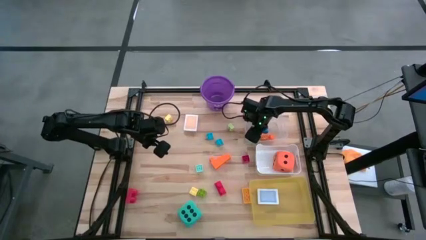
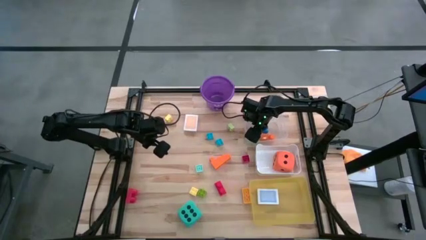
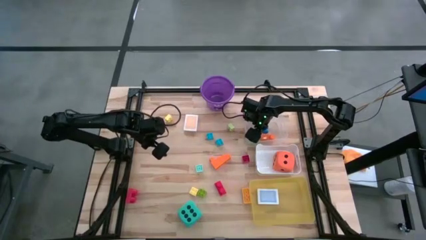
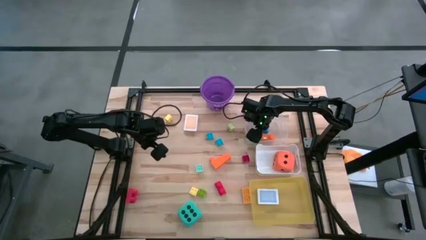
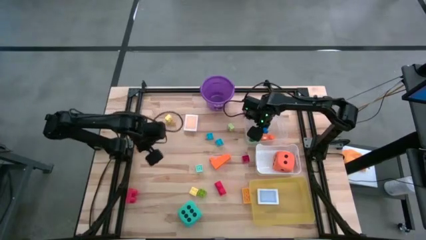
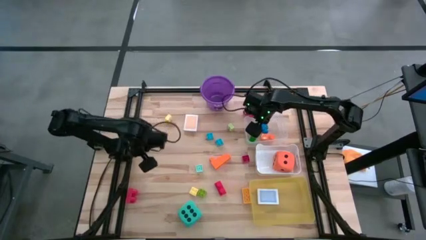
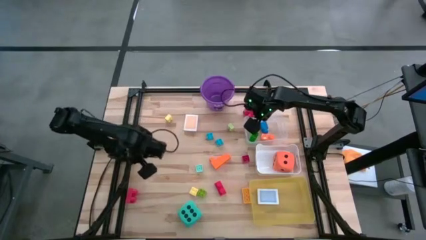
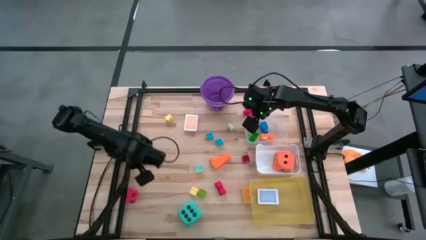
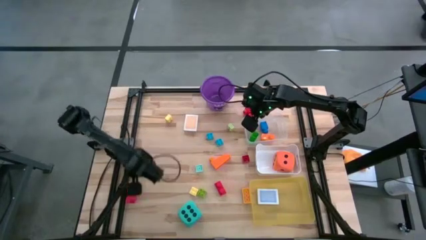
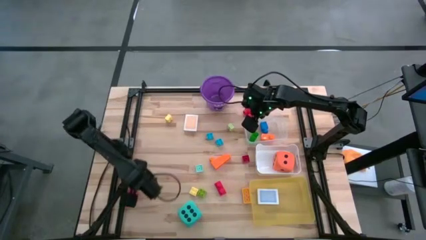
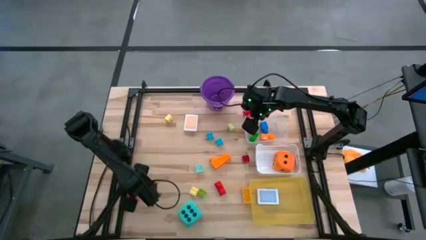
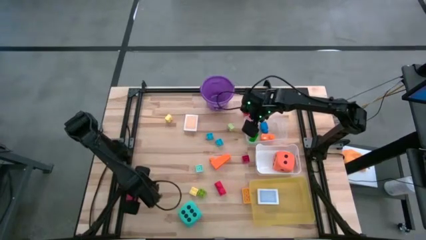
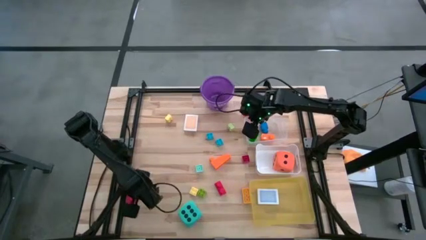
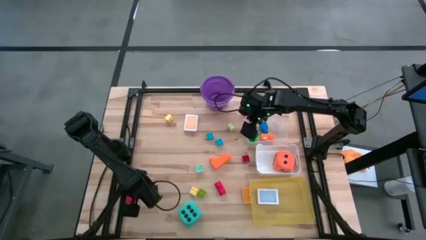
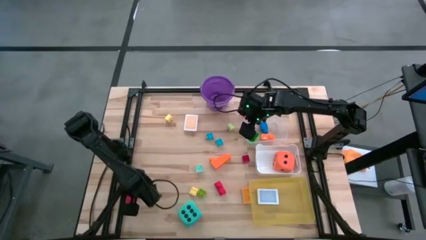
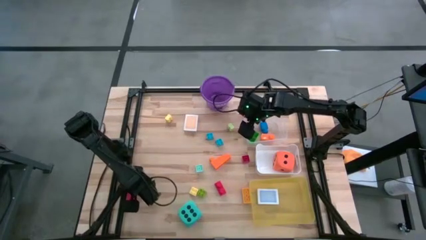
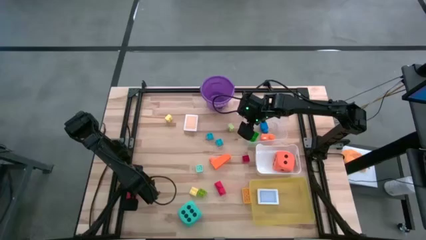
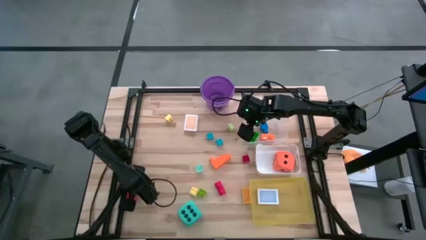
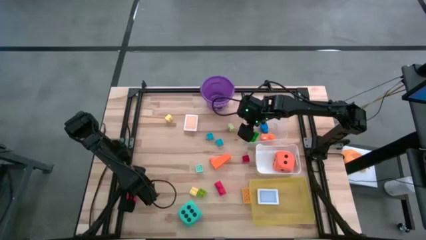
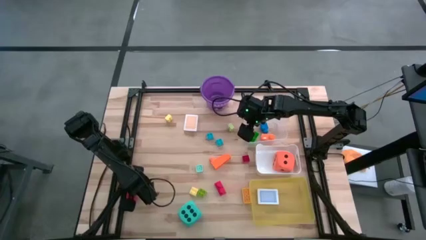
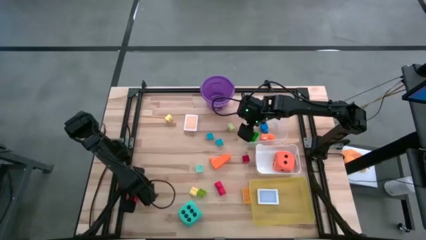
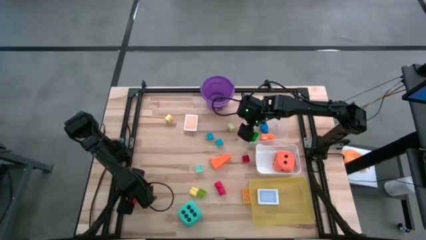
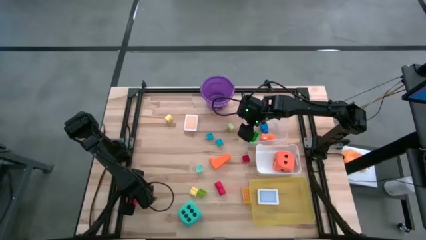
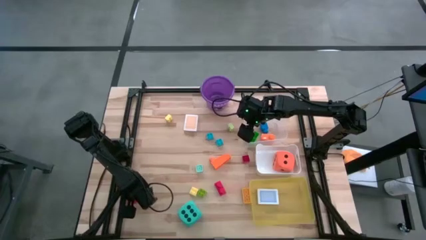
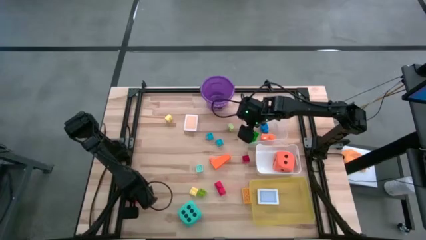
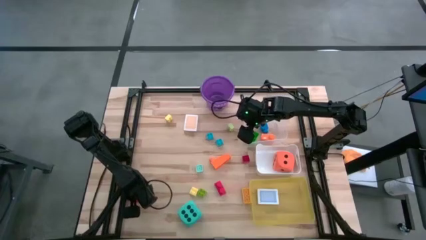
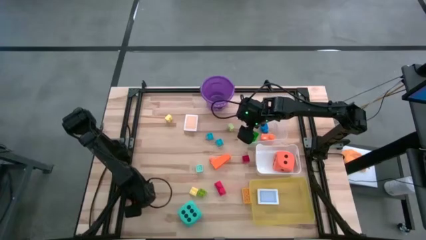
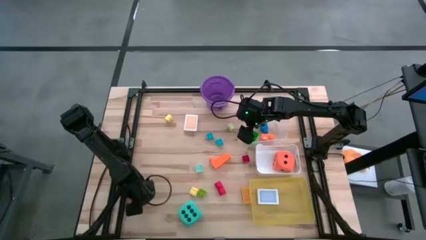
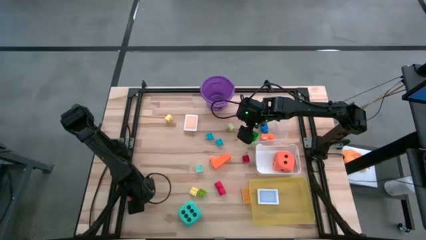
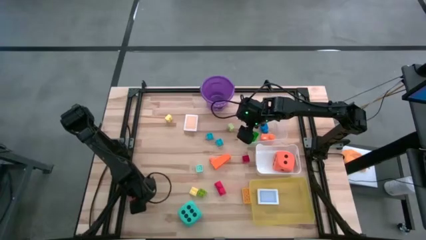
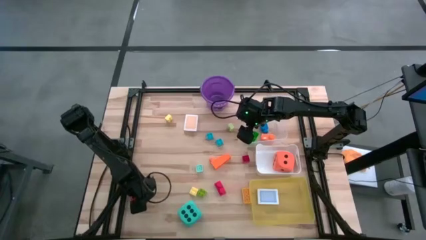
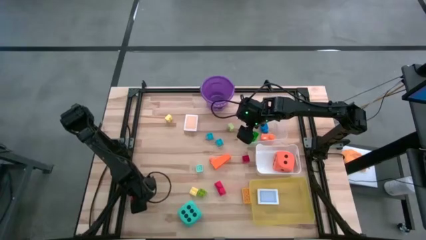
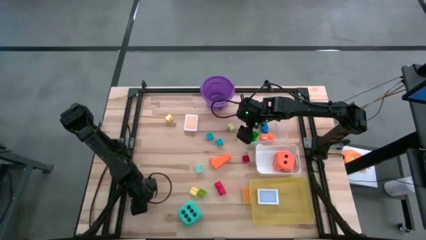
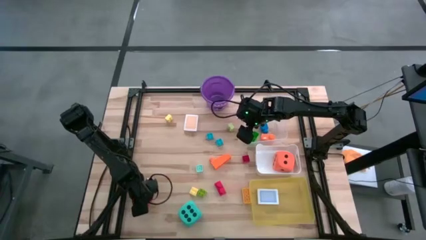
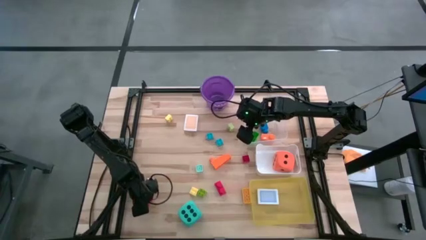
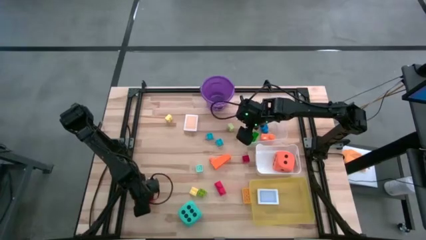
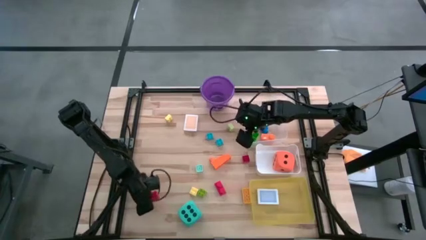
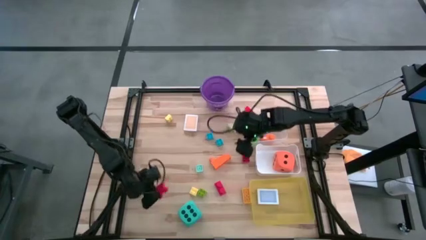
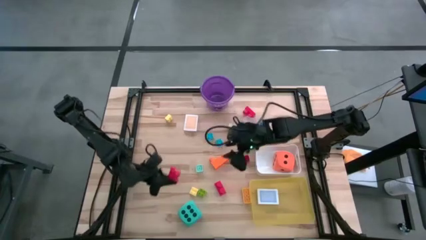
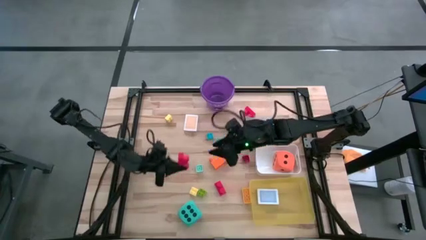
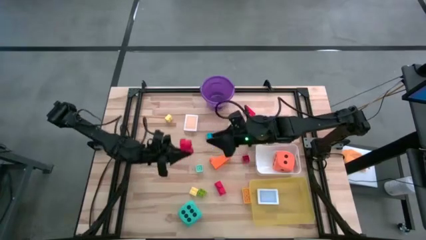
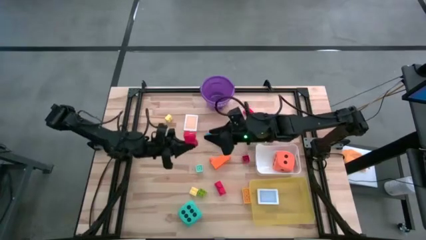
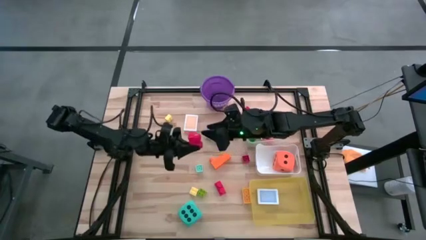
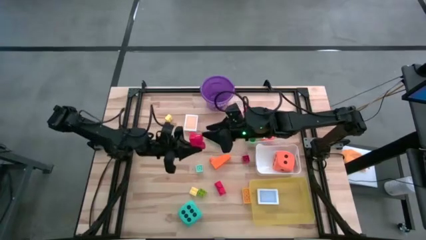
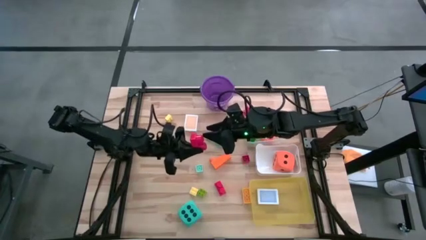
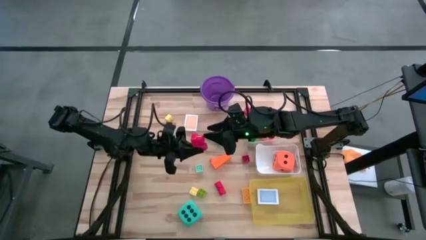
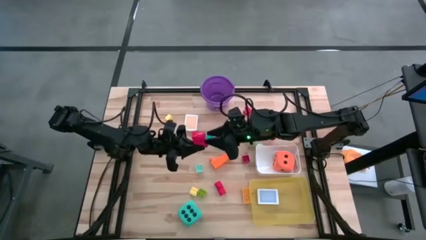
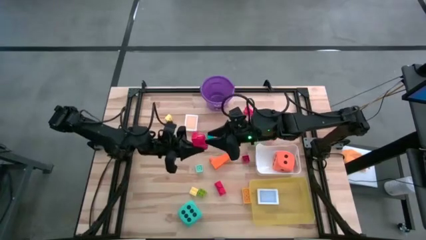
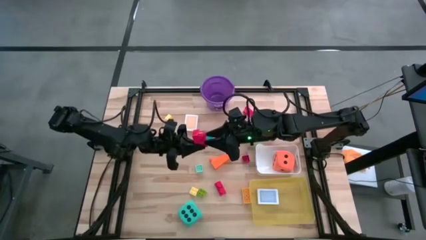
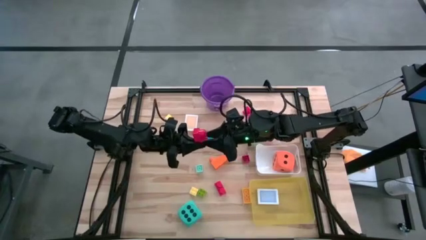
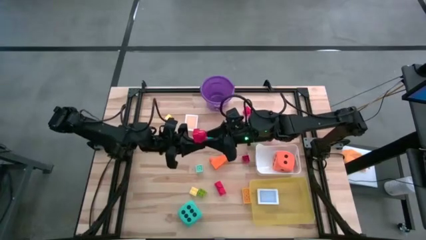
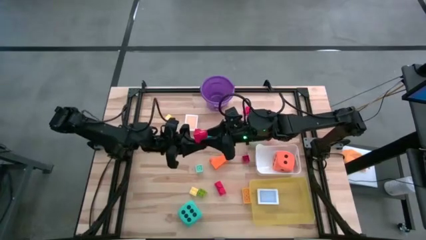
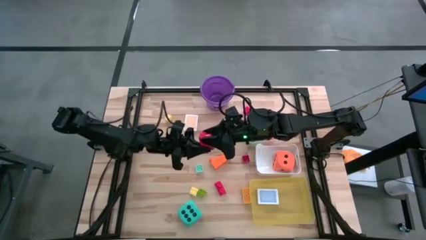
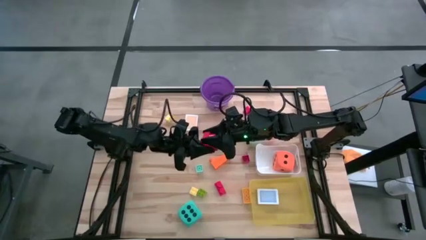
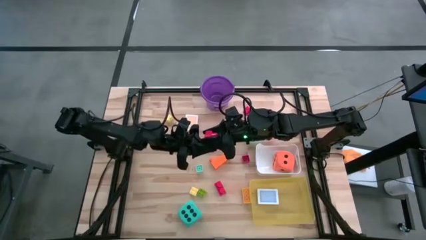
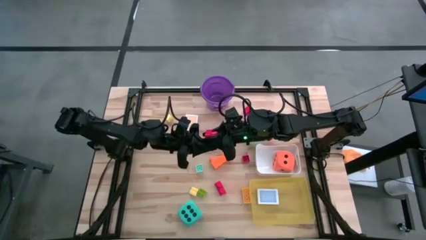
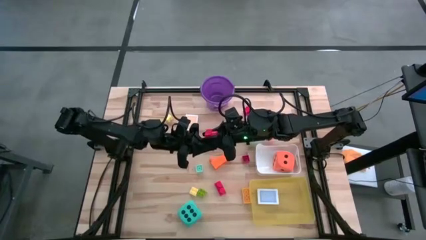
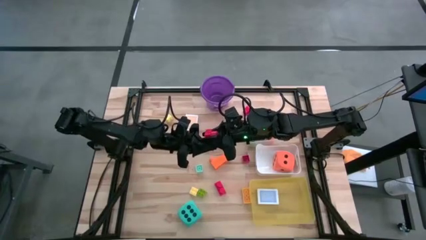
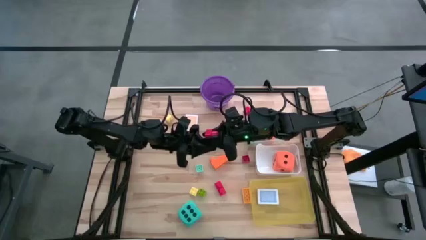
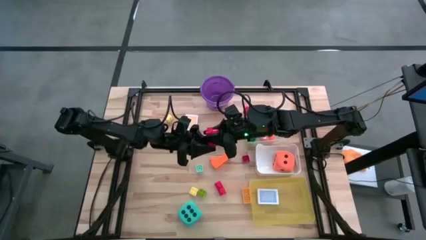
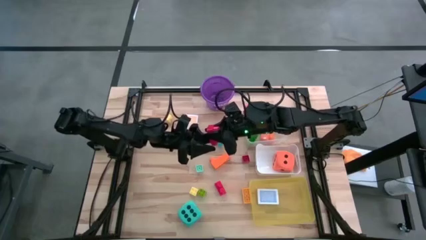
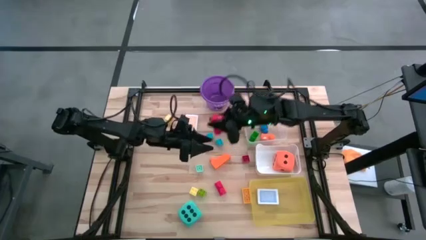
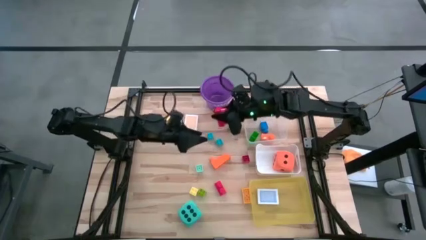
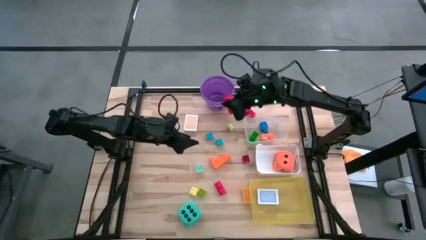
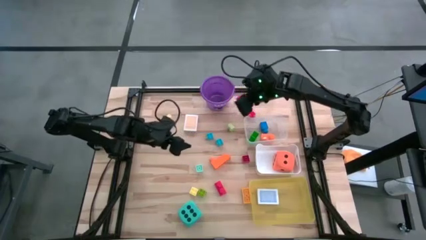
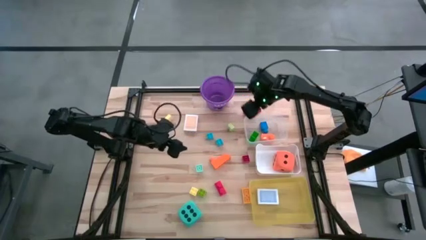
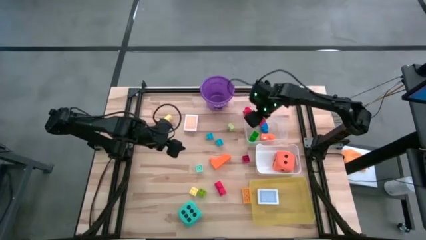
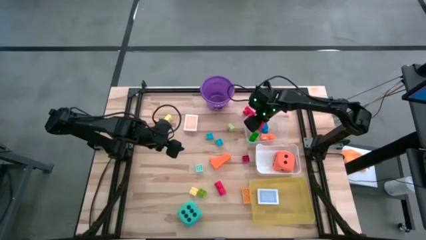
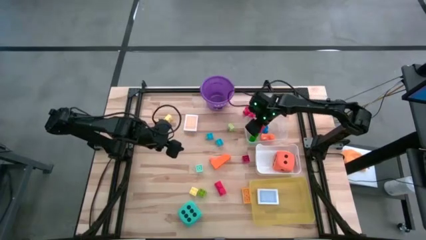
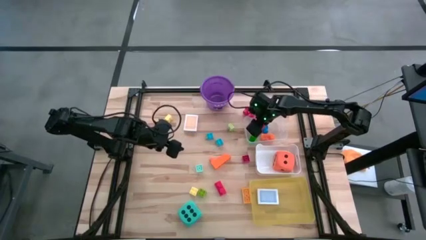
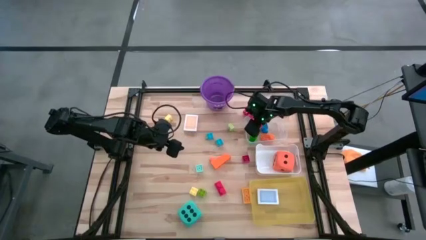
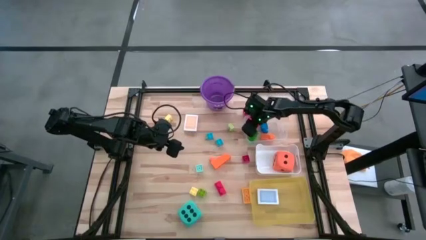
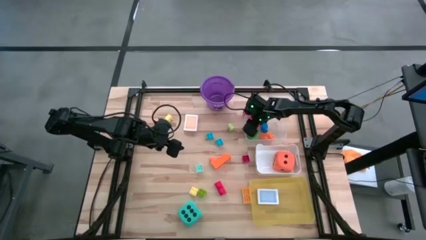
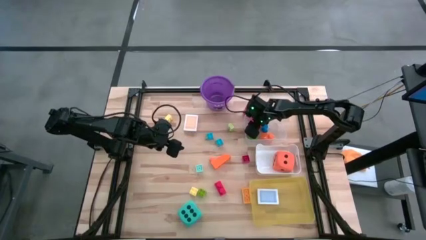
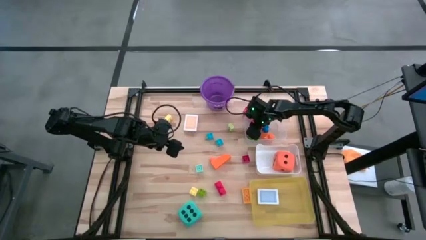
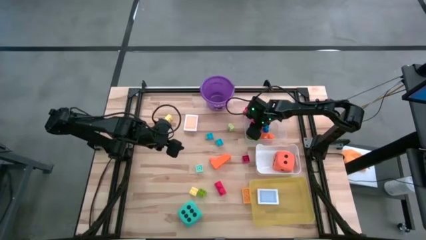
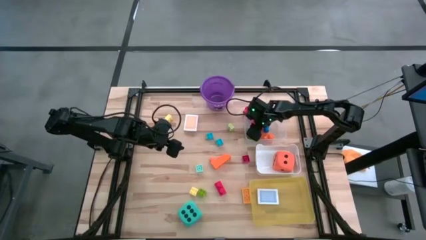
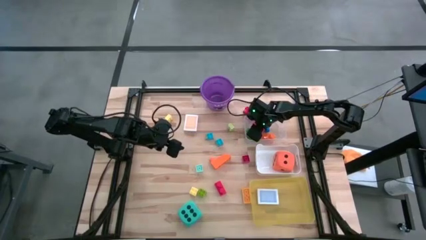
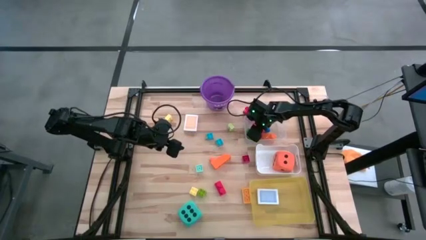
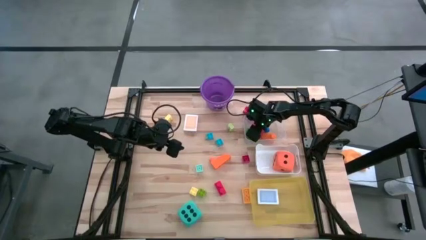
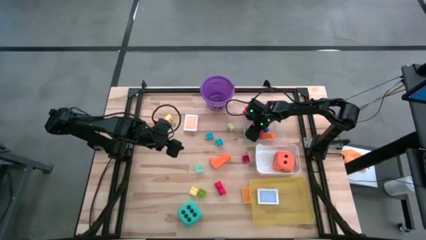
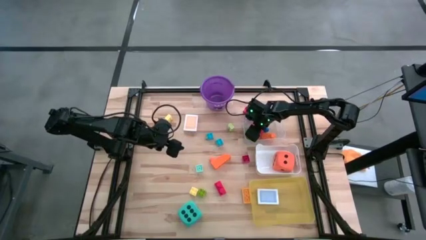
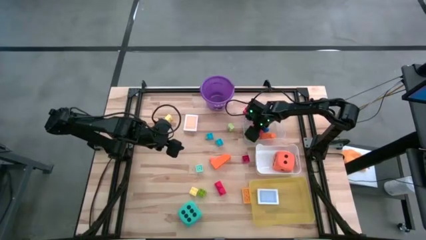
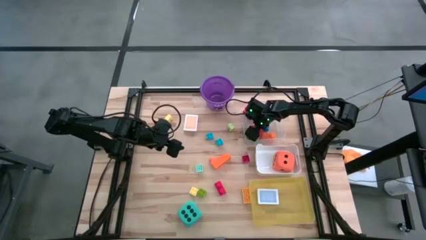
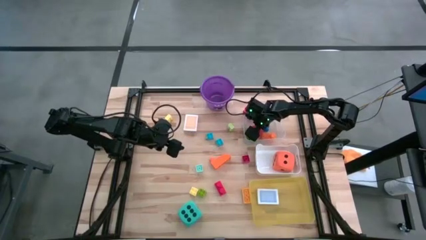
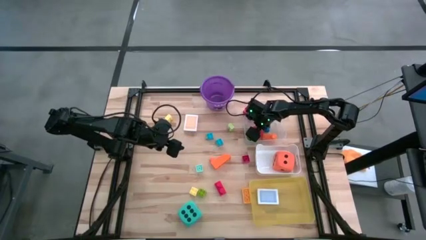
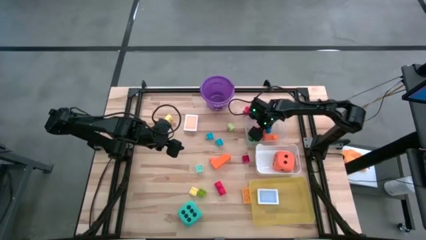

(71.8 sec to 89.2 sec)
Task: Pick & Place Toys
Put the red game piece into the transparent bin
